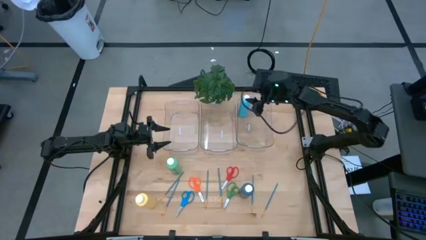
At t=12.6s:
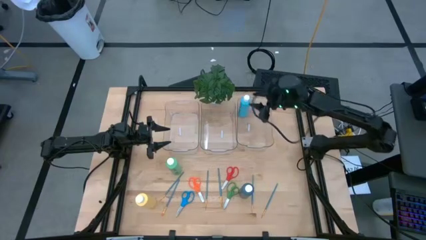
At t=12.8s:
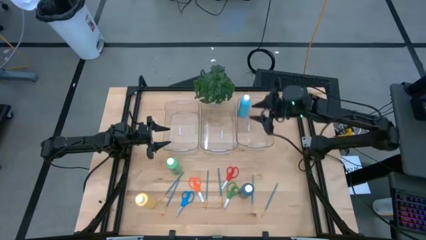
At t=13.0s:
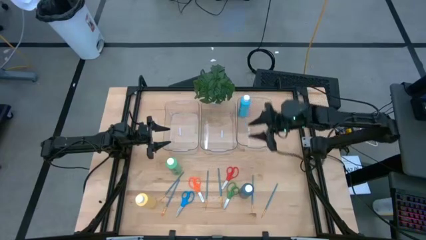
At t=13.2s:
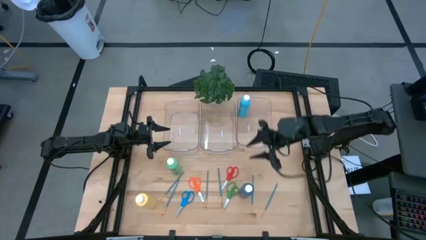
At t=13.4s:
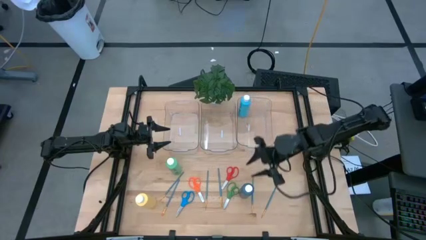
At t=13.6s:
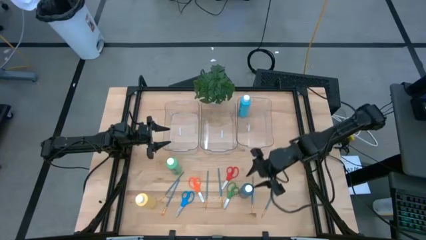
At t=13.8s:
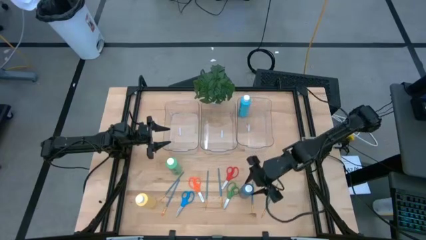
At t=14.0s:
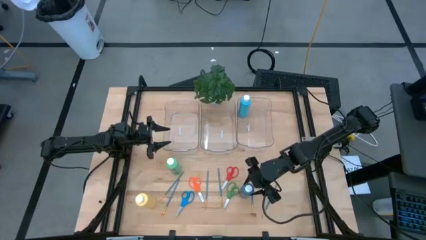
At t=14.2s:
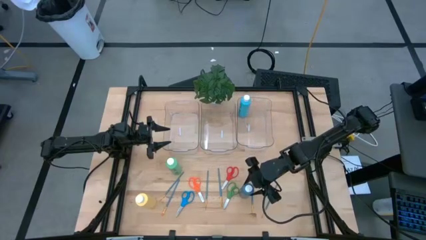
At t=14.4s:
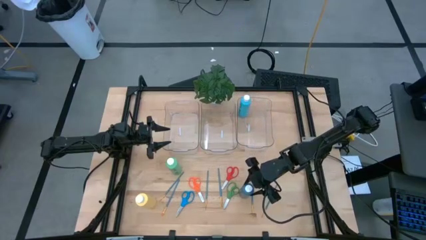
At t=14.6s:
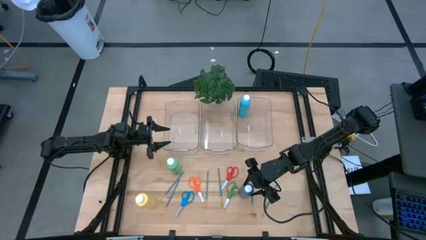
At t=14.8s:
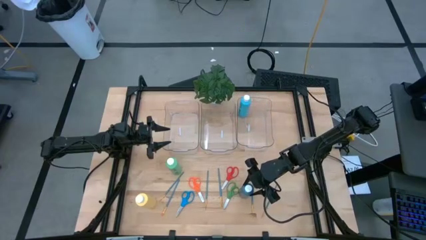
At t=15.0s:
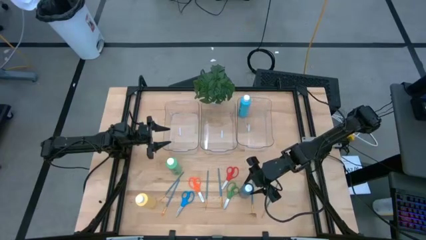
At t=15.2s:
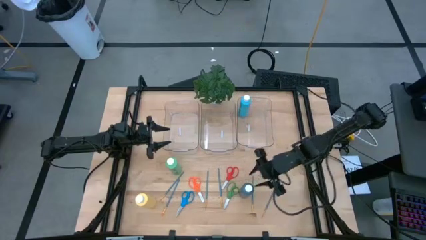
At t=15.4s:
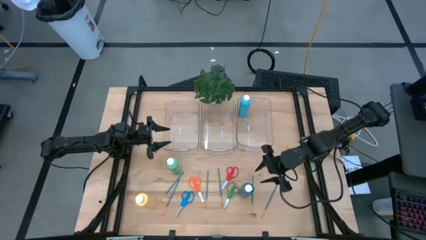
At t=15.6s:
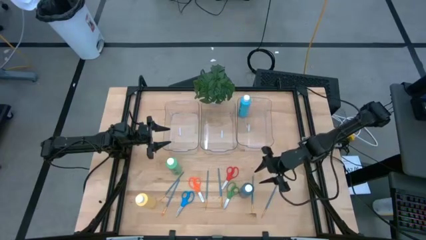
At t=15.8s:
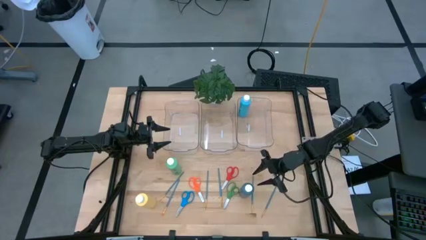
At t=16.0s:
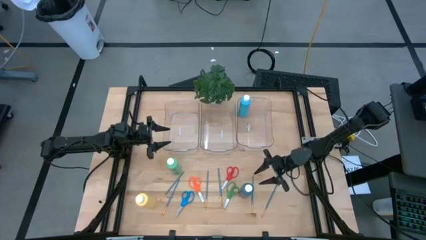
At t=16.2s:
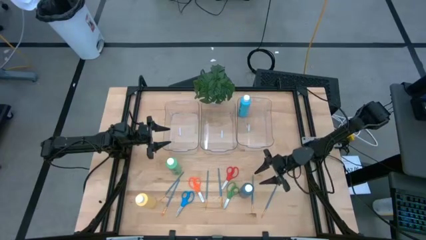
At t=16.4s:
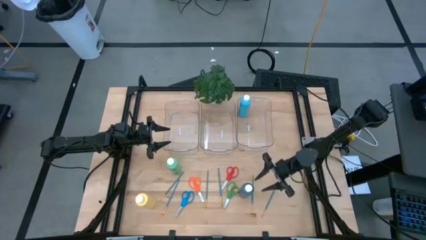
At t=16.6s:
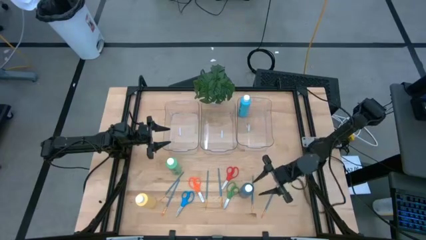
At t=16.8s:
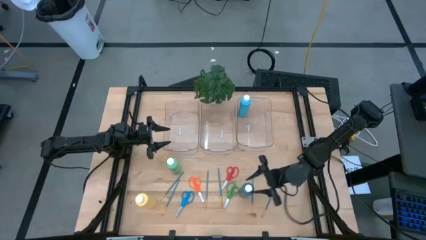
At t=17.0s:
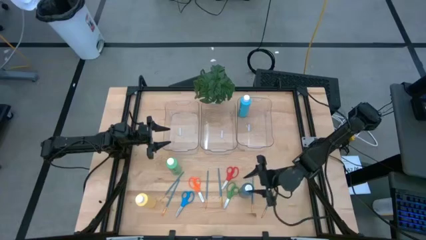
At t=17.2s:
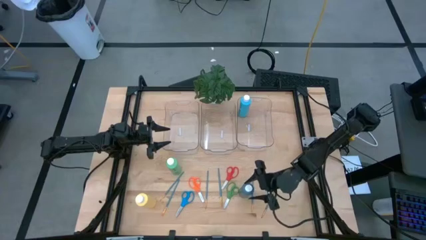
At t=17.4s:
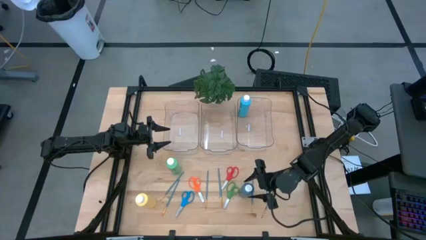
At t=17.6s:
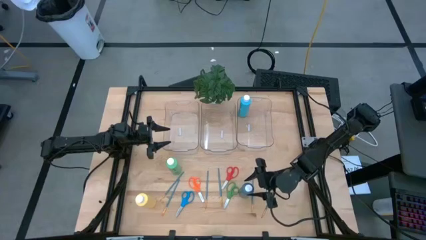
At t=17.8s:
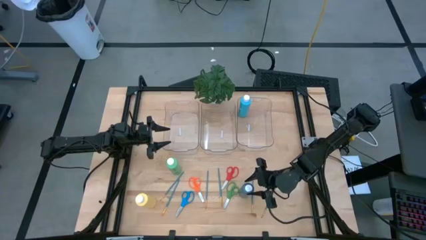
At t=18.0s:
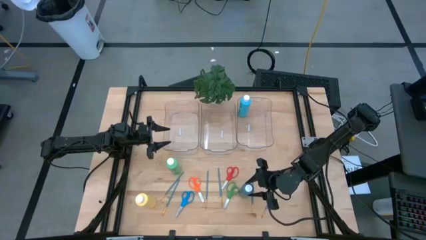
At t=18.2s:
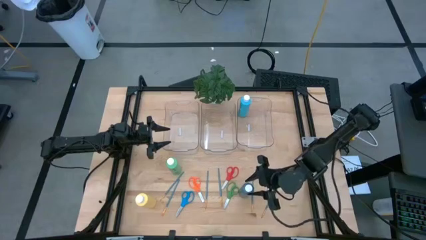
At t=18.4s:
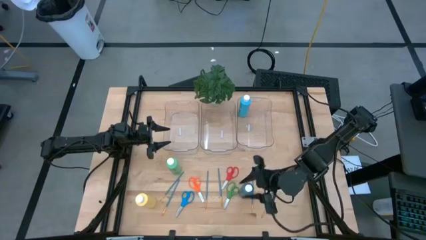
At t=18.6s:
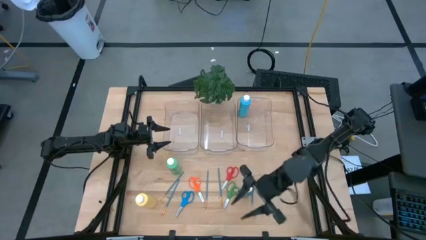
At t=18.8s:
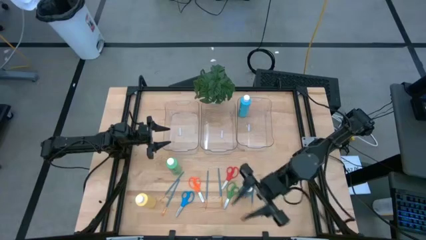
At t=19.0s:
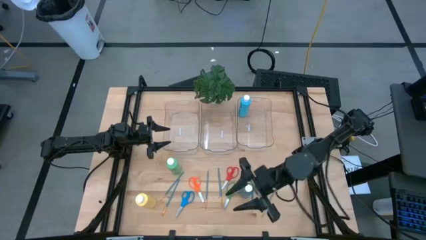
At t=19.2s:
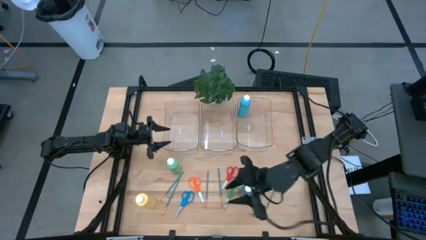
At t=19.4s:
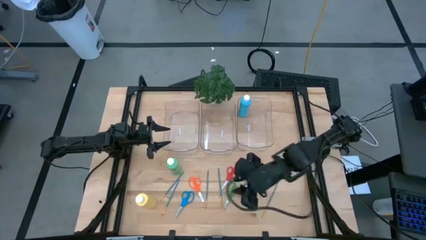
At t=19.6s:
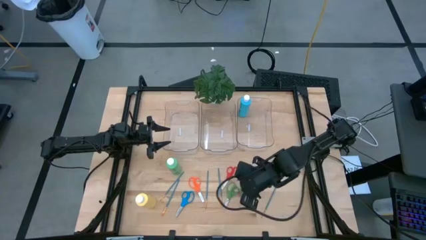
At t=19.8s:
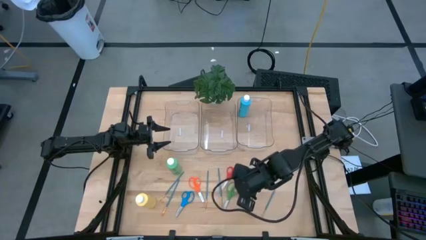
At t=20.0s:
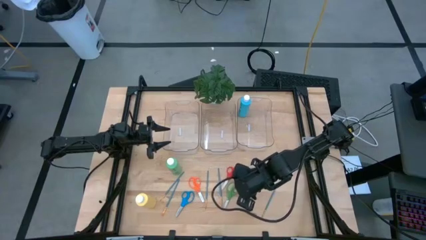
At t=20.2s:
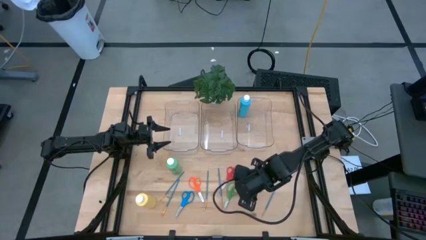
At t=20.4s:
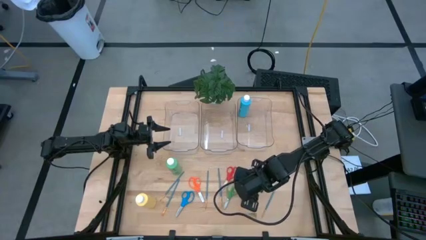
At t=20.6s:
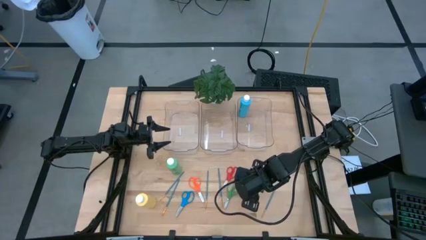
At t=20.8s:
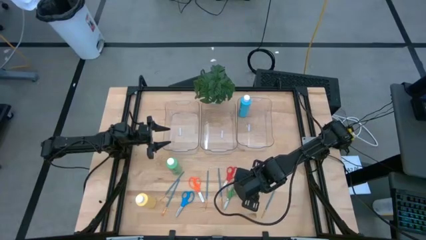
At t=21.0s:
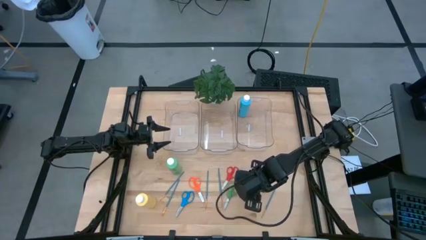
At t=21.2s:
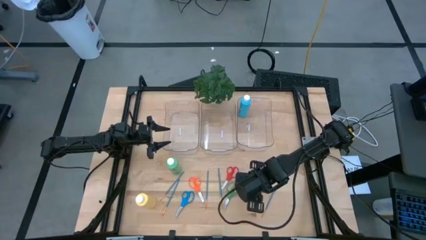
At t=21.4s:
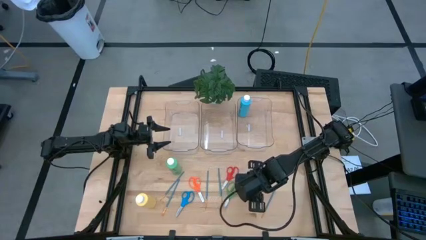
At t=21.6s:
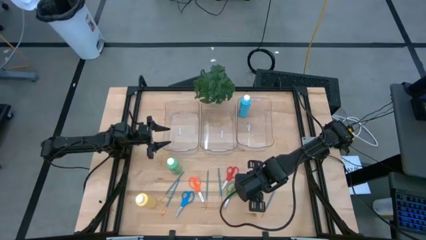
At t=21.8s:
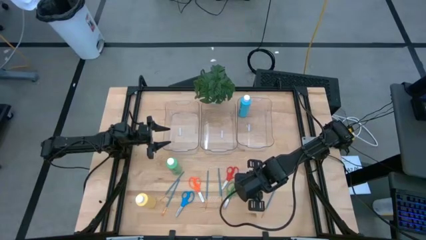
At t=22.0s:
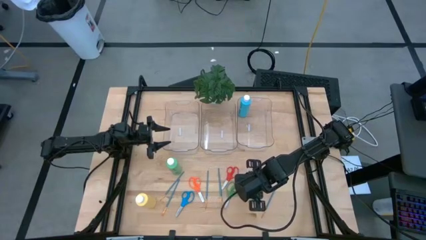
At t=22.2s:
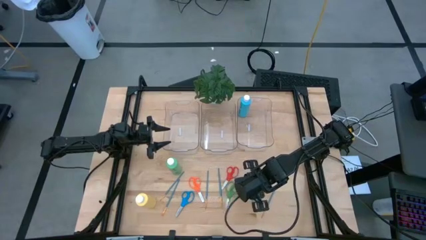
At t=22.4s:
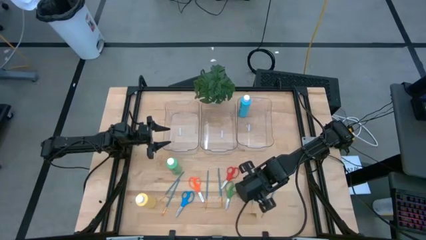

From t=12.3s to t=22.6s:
Task: Pick & Place Paint Supplies
Put the blue paint bottle into the right transparent bin

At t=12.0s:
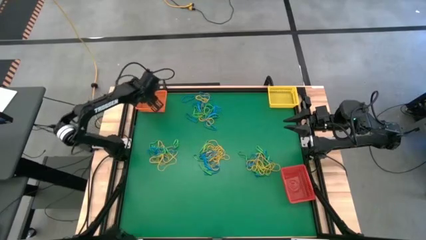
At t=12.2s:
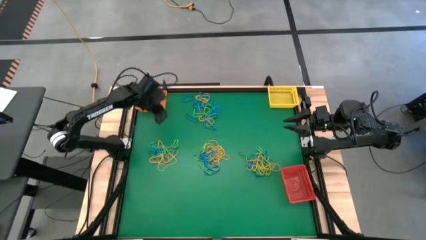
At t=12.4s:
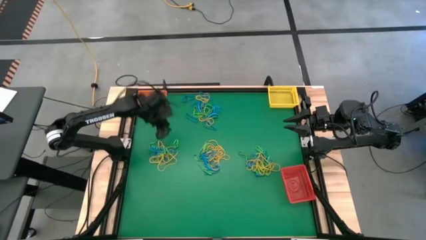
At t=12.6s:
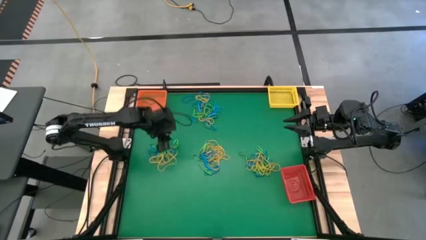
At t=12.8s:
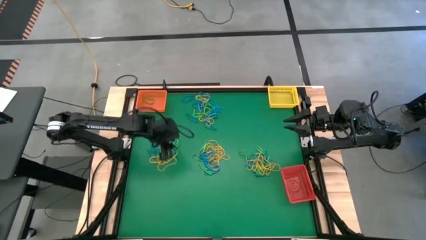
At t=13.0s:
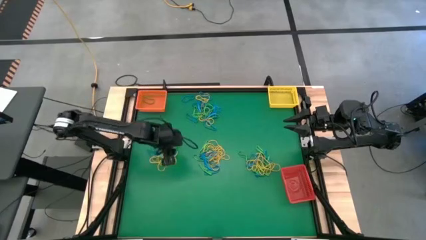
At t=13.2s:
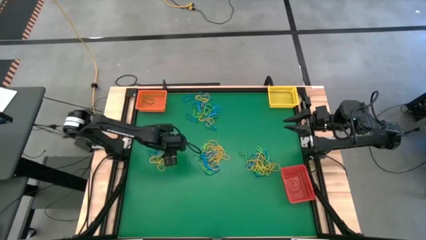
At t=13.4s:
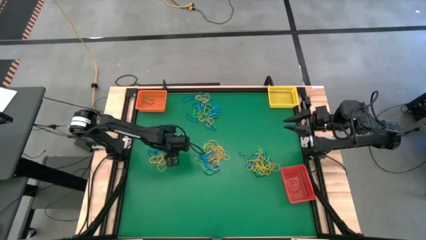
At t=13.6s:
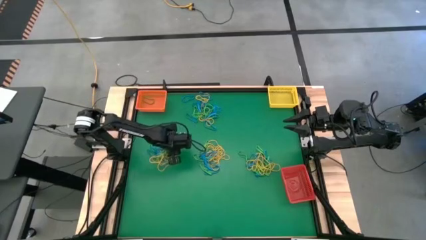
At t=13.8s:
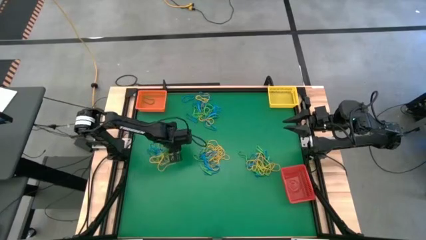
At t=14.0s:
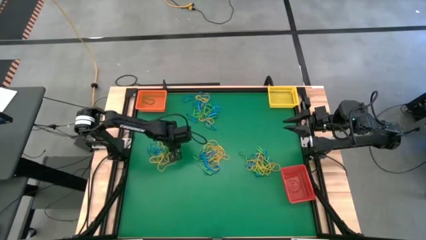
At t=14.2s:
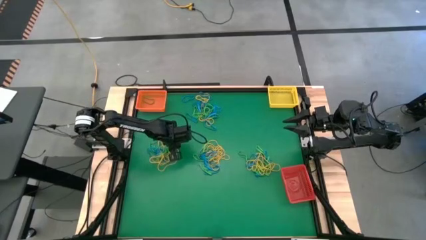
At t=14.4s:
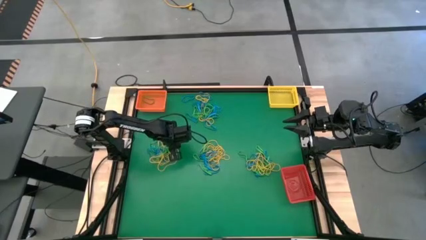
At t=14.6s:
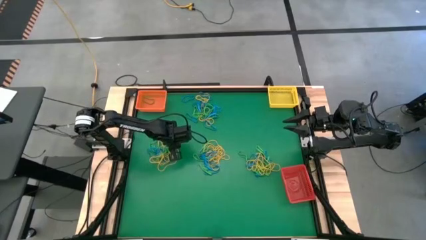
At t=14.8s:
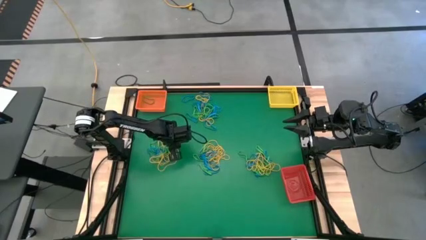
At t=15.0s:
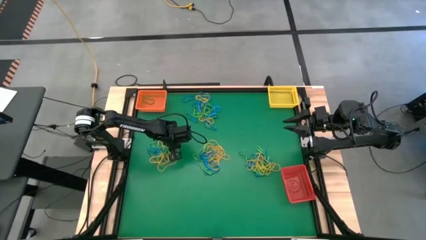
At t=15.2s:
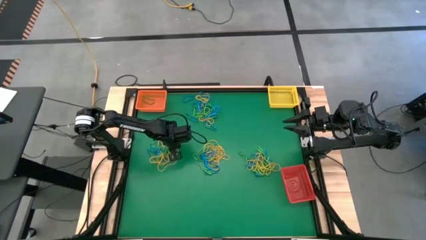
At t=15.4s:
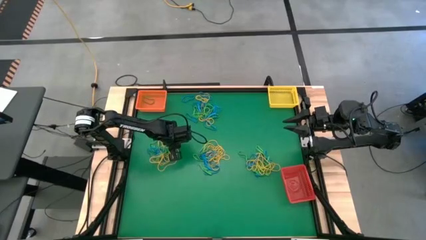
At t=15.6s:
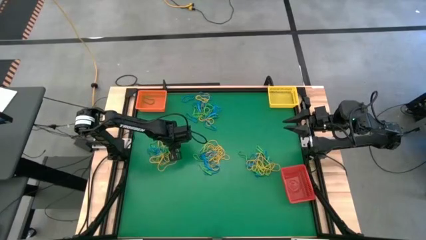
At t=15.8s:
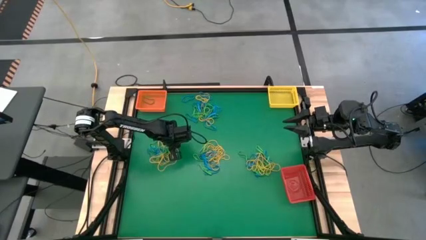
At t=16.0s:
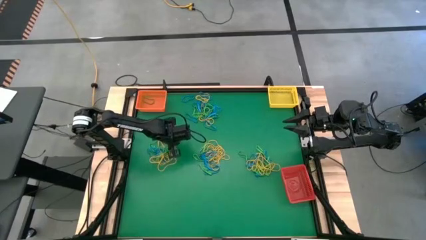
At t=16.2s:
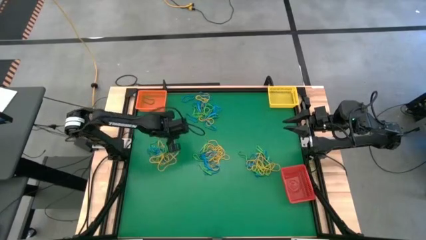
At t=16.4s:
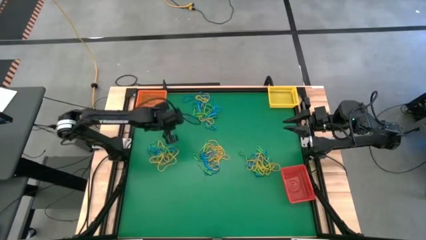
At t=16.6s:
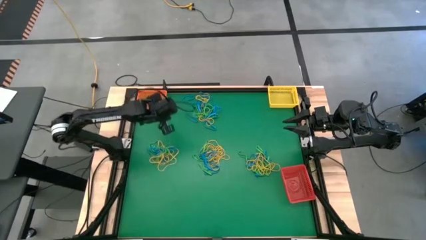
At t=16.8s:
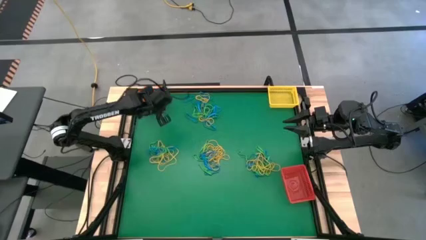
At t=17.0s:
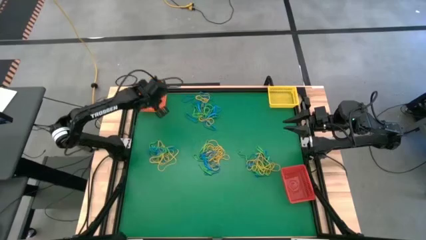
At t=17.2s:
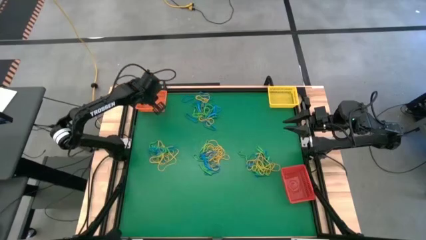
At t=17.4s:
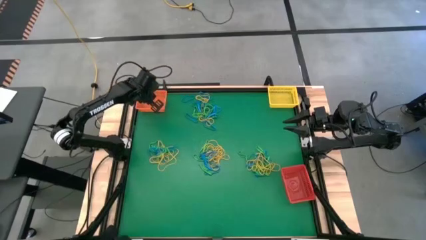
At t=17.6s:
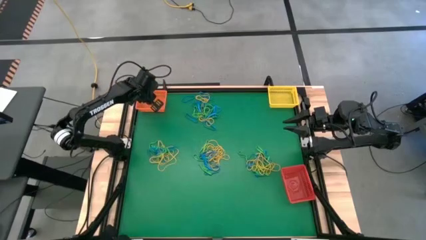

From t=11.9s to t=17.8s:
Task: Sort rubber bands into baskets
Put the green rubber band into the orange bin
